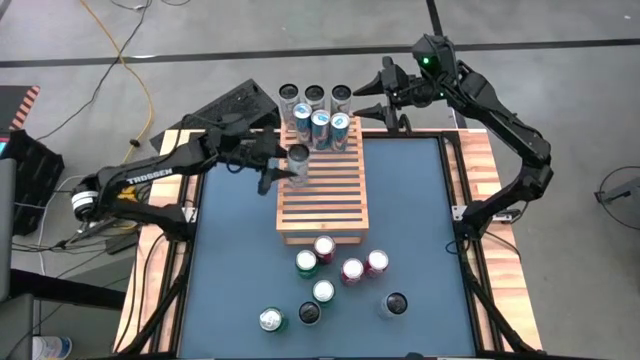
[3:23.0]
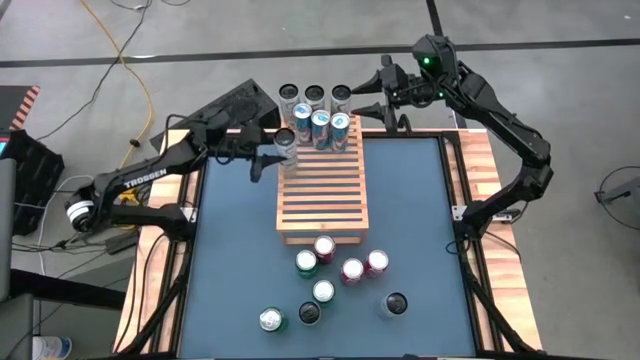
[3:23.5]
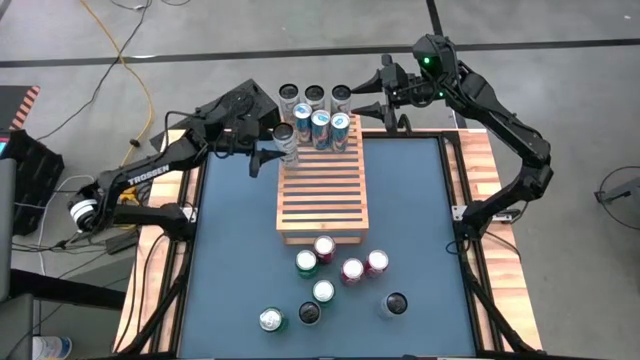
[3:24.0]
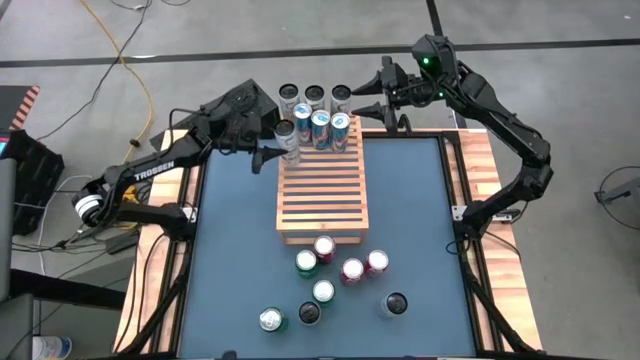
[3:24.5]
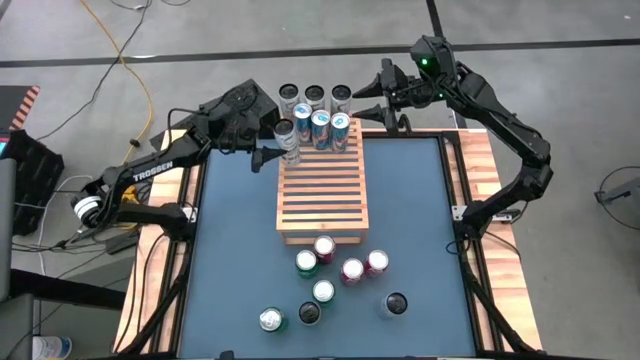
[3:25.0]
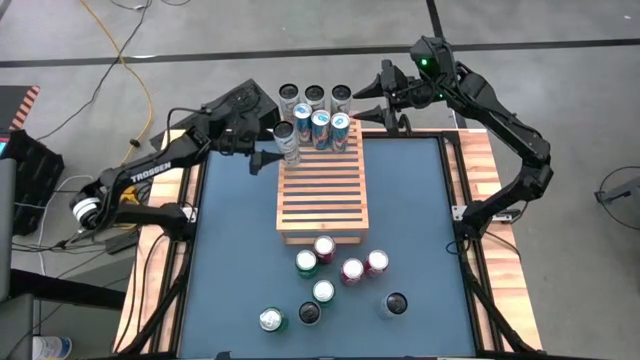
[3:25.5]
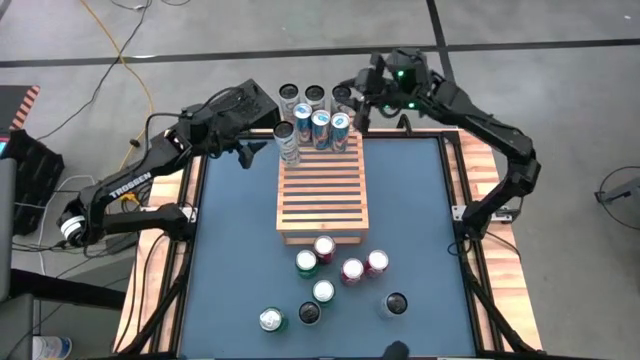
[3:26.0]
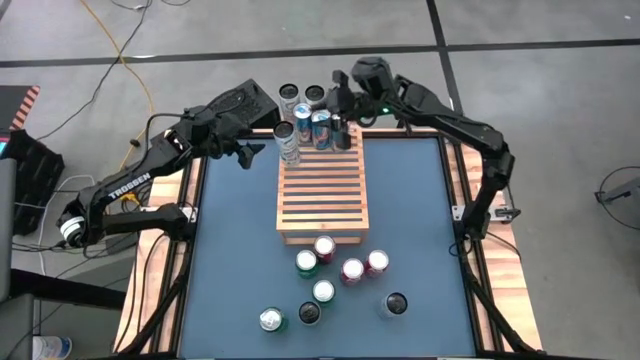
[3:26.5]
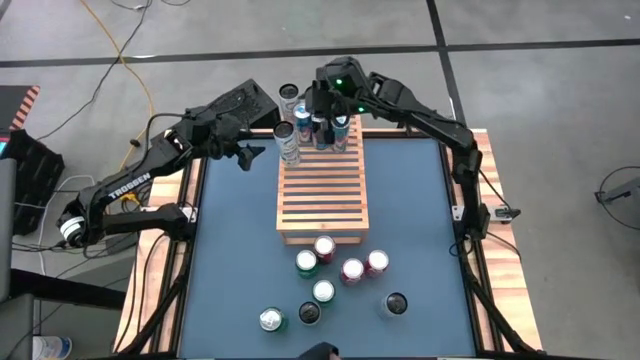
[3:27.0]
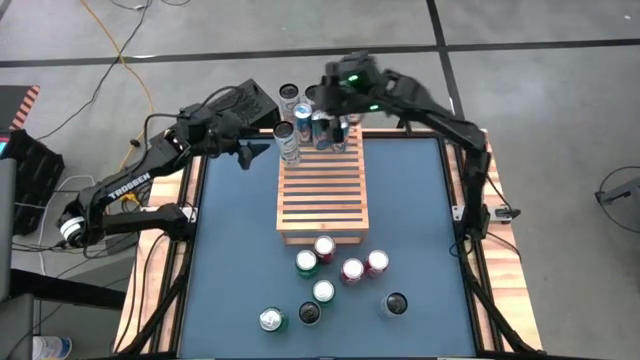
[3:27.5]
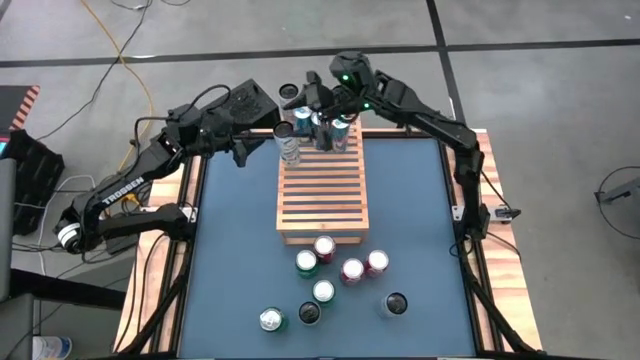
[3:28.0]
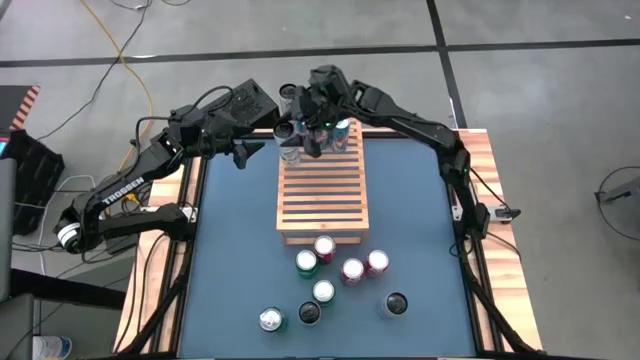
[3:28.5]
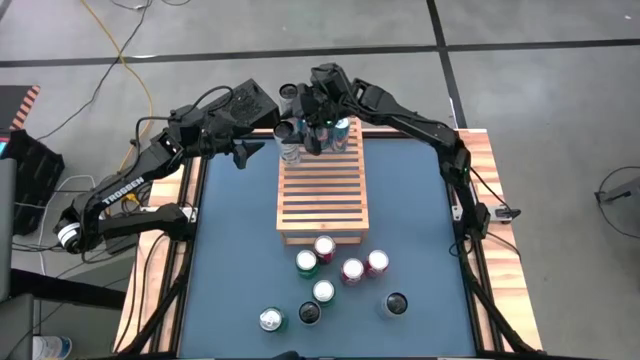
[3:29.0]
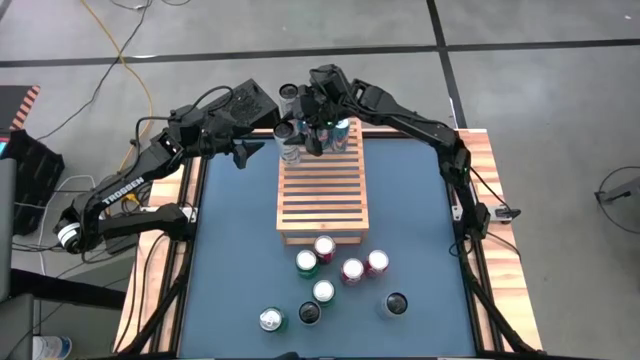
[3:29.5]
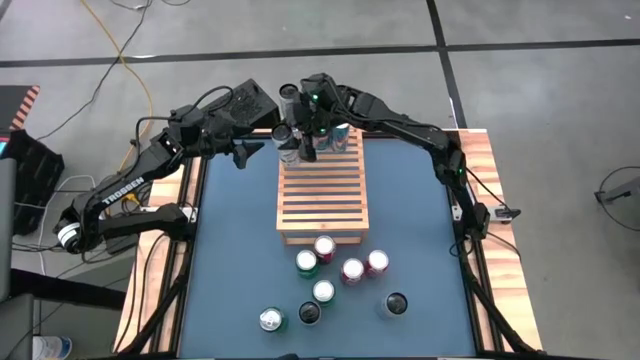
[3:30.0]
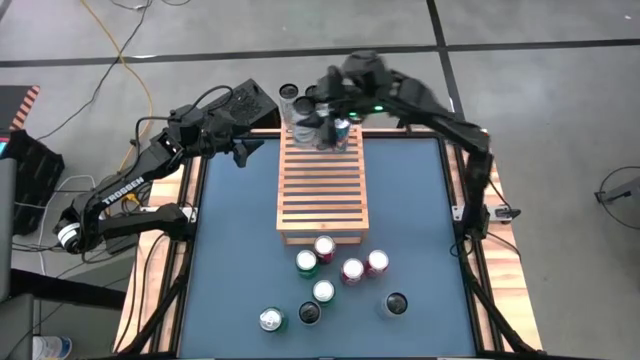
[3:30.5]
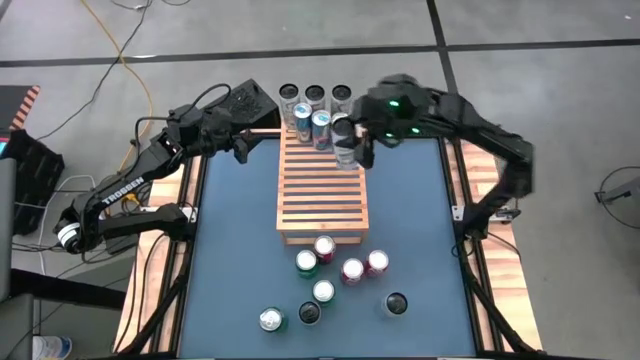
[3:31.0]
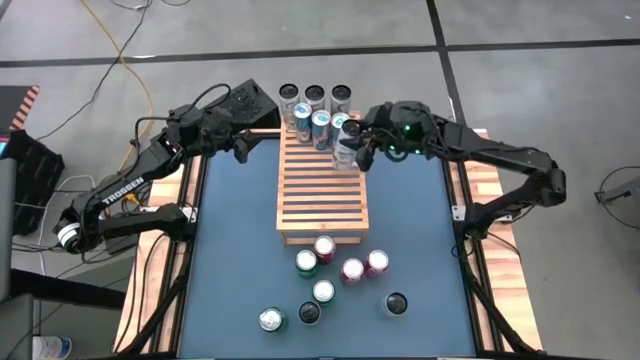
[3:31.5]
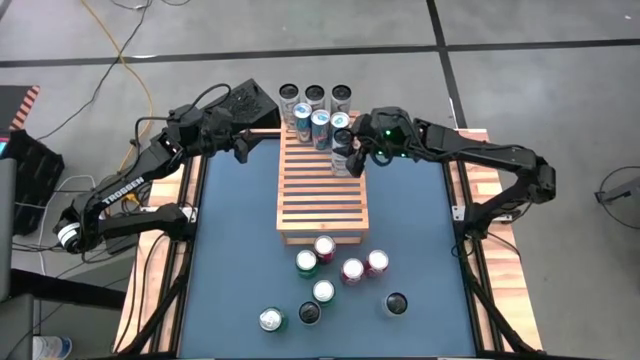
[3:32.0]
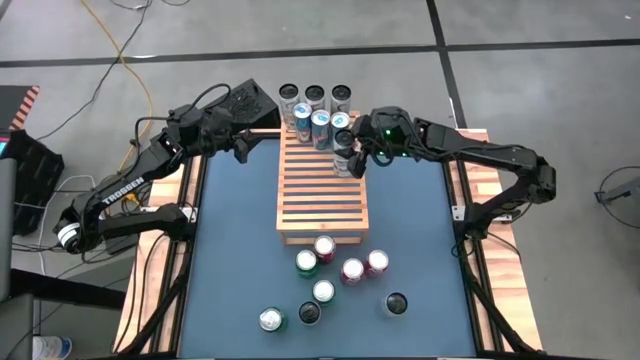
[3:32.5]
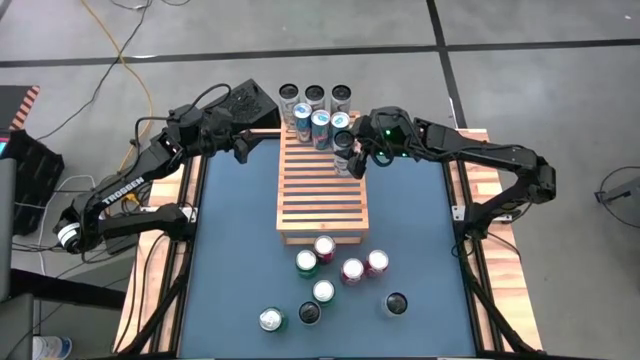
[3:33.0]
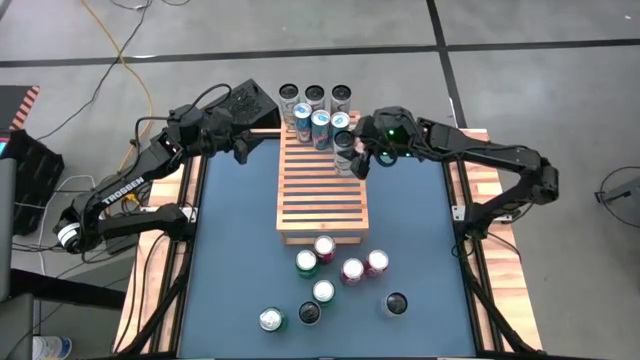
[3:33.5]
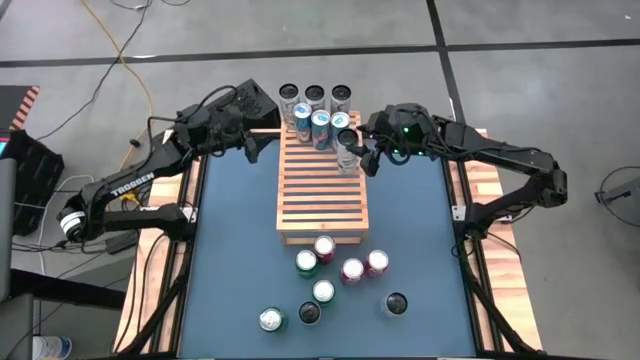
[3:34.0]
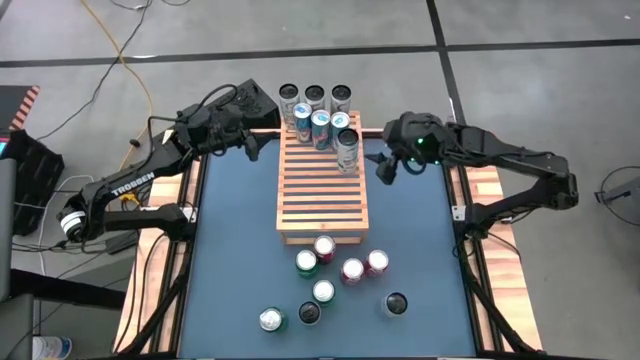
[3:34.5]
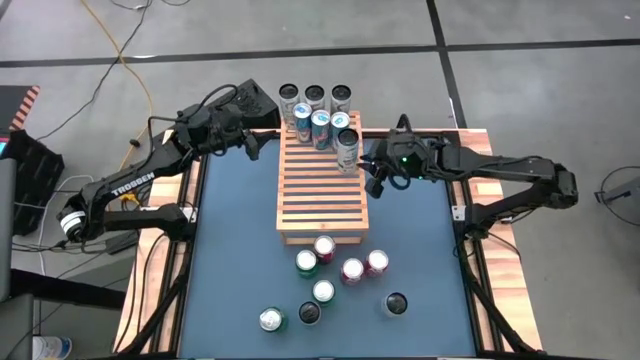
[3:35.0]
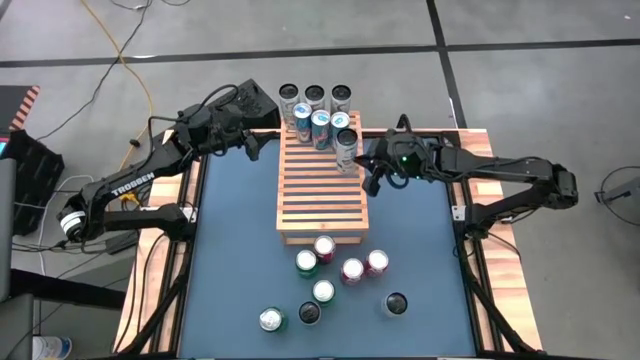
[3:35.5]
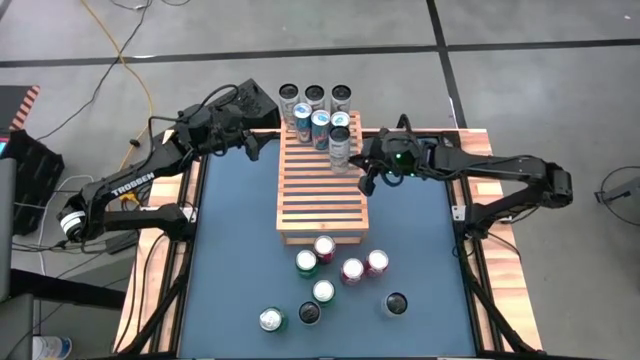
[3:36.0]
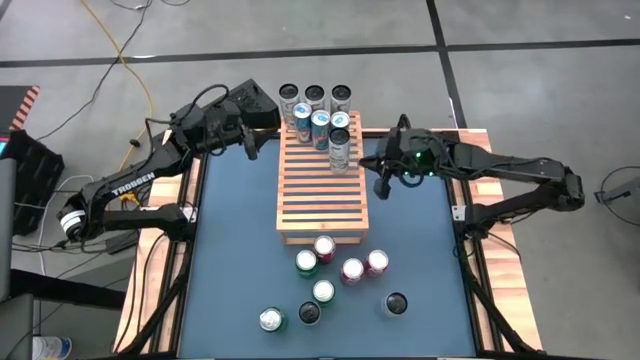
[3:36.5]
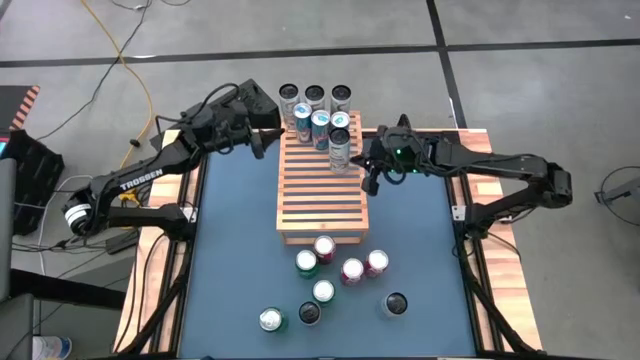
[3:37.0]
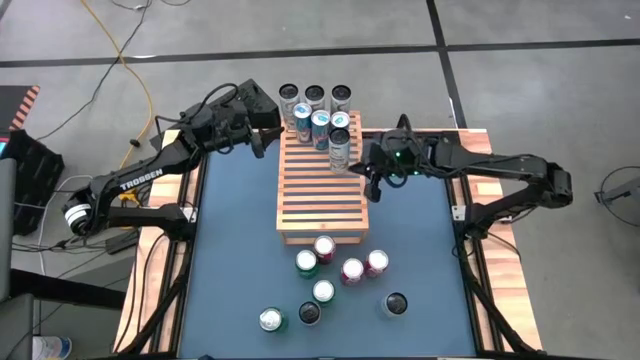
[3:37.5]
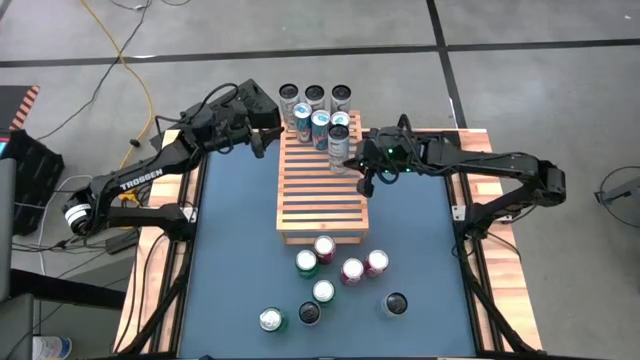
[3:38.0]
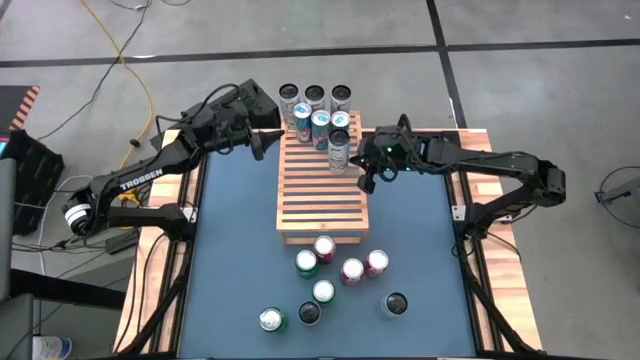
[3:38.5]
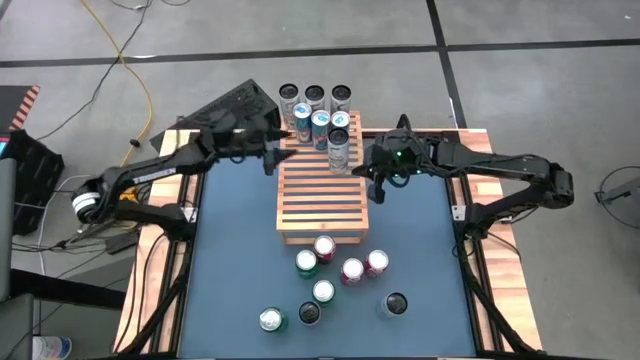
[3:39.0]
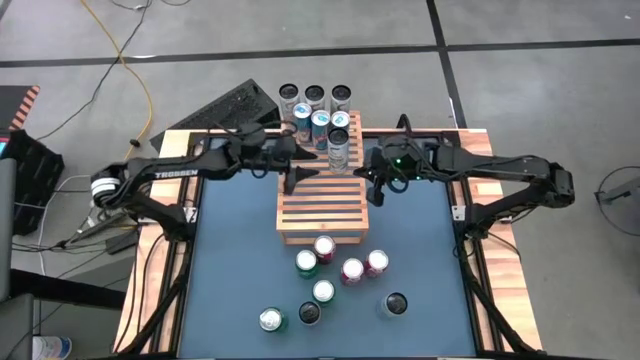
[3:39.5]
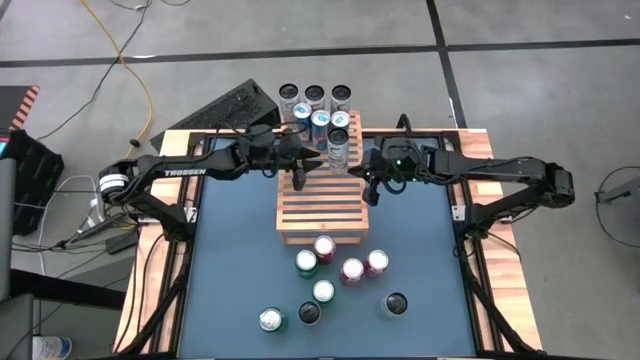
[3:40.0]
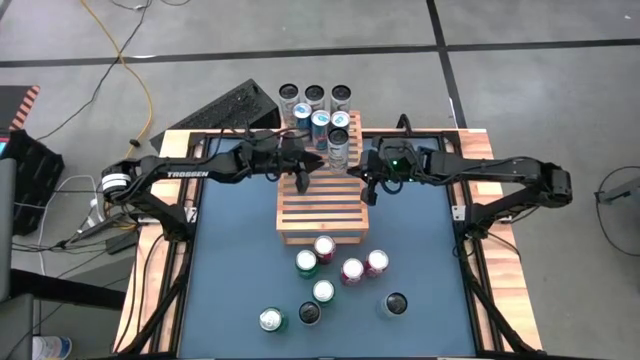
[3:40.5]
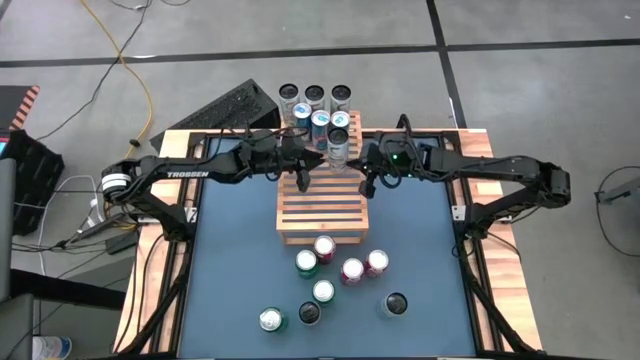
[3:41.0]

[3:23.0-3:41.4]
Task: Place canned beverage on shelf
Put the top center white blue soda can on the shelf

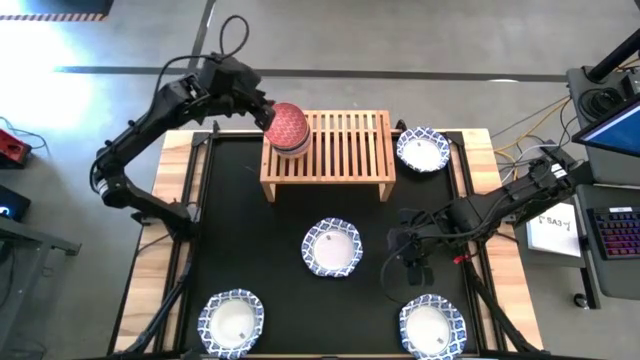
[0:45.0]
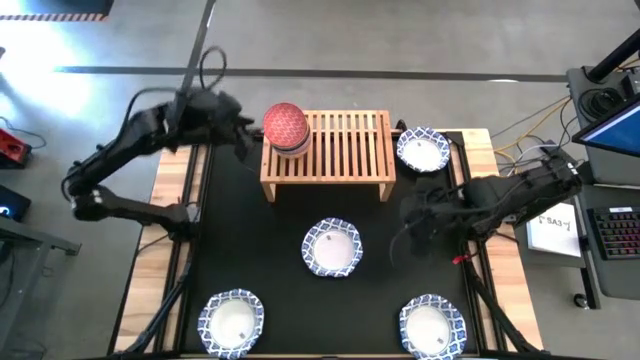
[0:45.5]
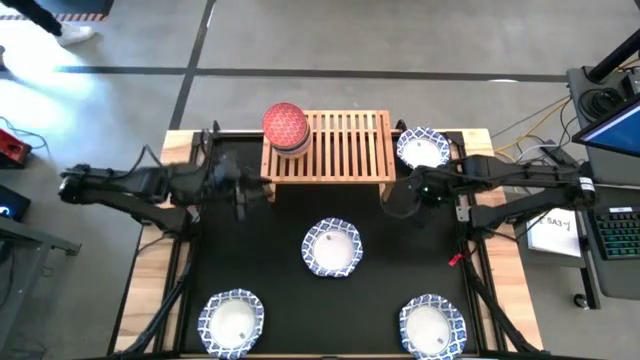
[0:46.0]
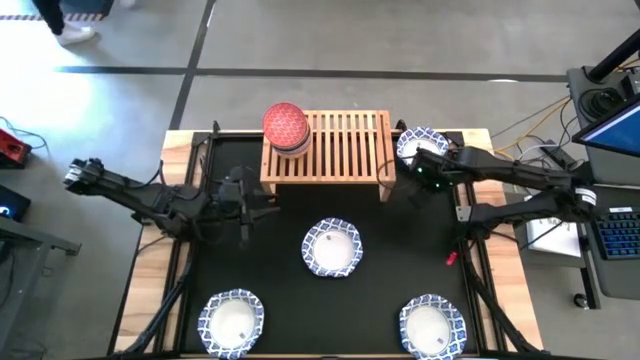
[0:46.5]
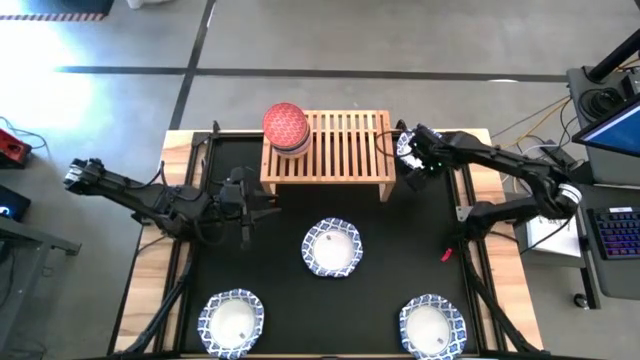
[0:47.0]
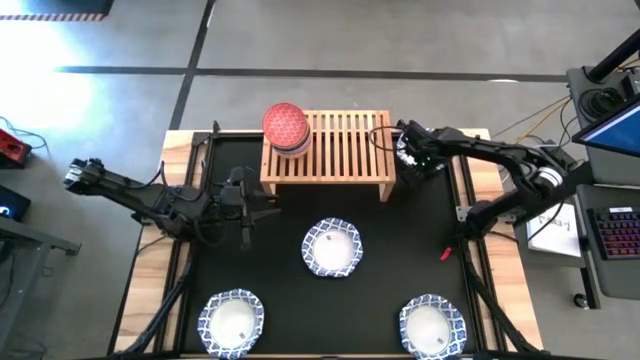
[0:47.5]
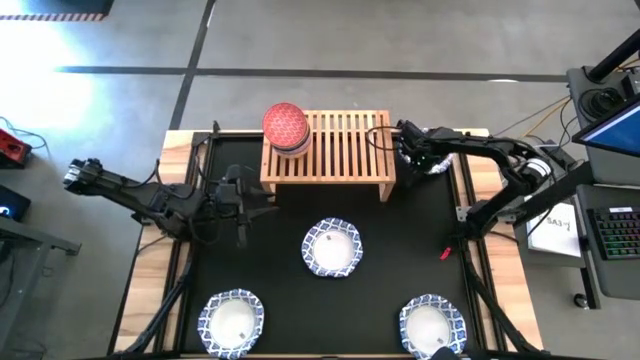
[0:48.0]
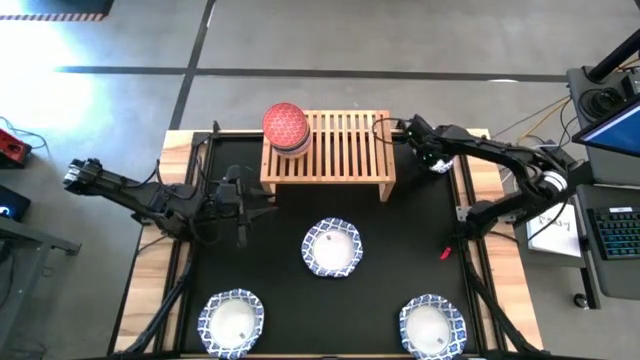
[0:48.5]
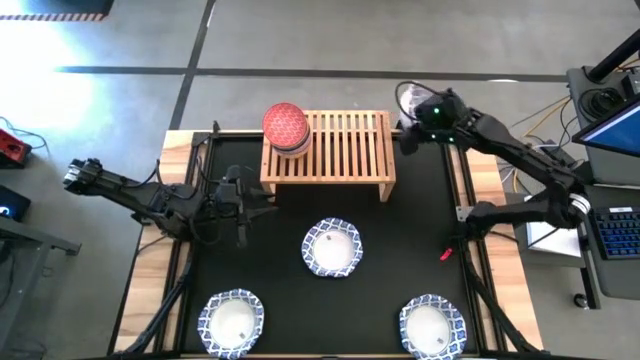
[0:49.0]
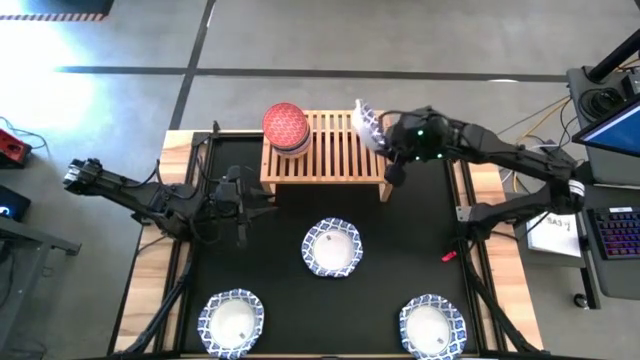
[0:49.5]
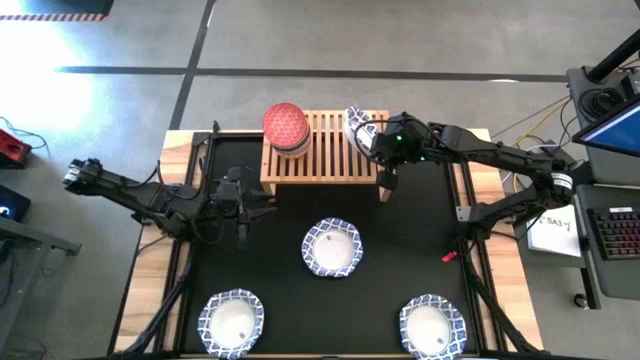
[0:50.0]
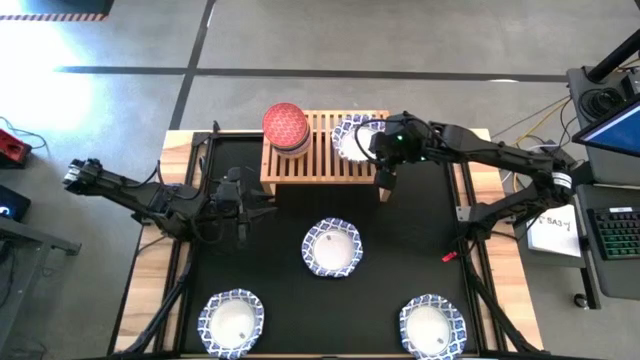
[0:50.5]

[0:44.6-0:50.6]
Task: Place and stack bowls onto a shelf
Put the white bowl on the shelf
